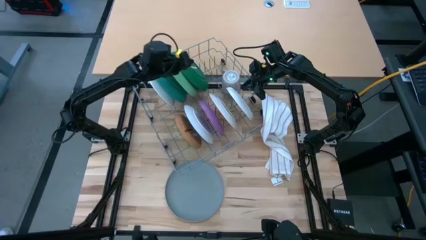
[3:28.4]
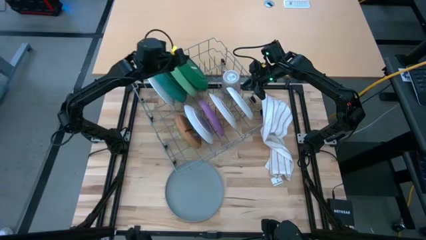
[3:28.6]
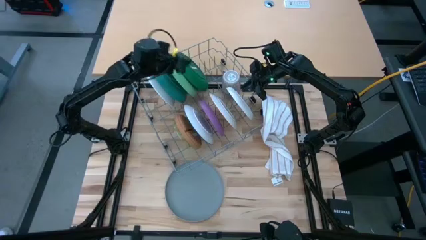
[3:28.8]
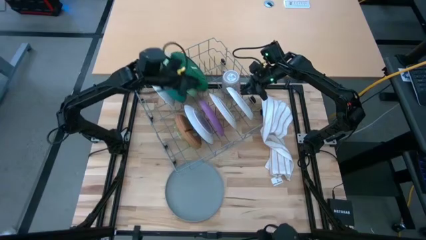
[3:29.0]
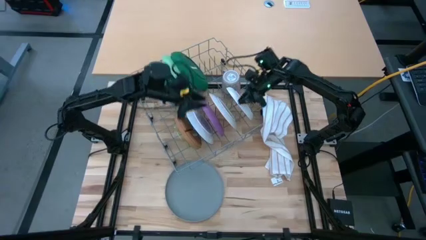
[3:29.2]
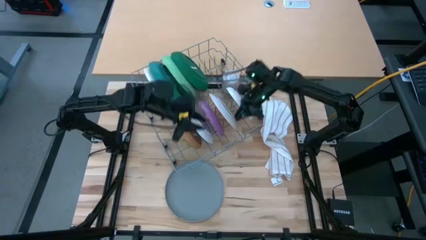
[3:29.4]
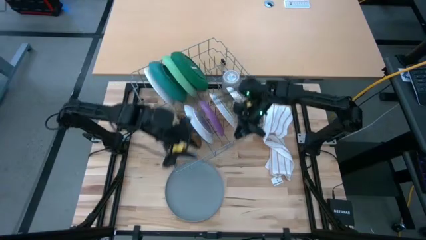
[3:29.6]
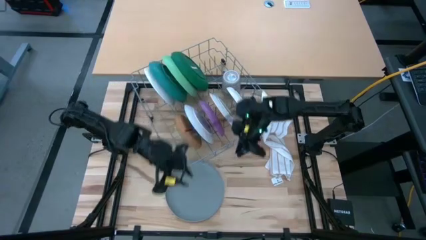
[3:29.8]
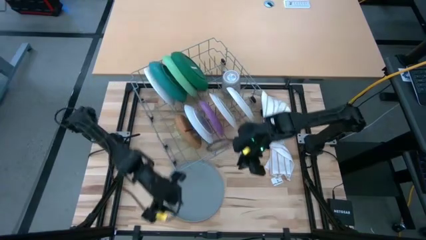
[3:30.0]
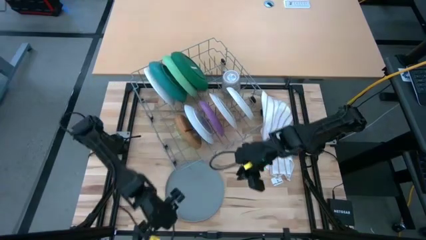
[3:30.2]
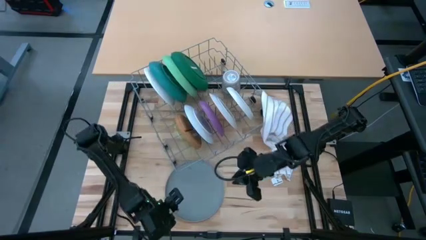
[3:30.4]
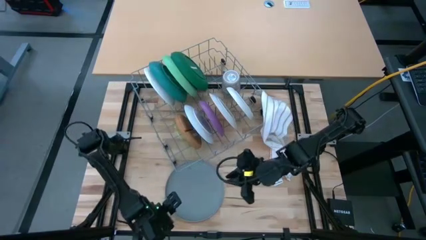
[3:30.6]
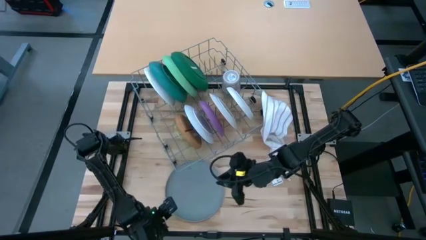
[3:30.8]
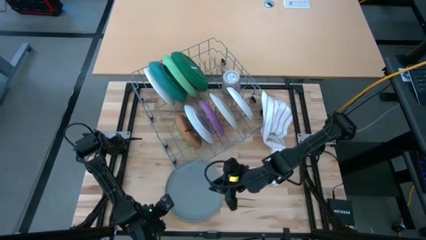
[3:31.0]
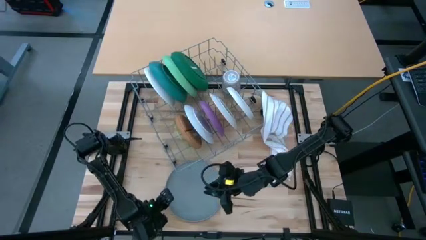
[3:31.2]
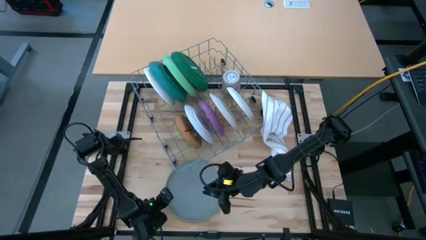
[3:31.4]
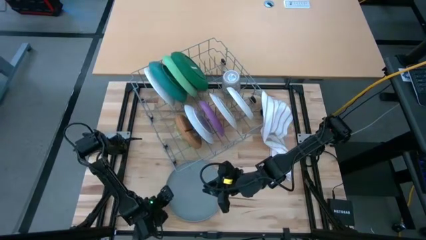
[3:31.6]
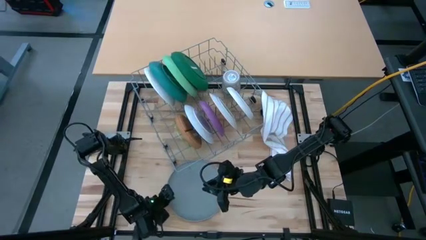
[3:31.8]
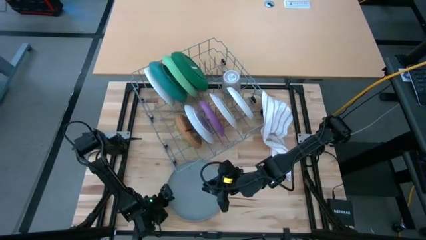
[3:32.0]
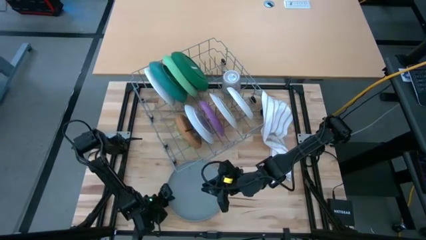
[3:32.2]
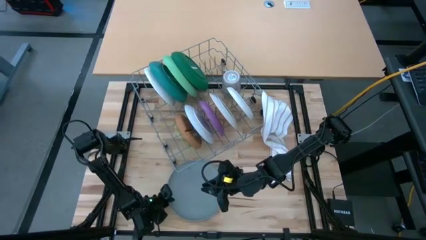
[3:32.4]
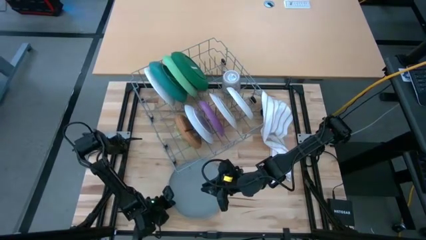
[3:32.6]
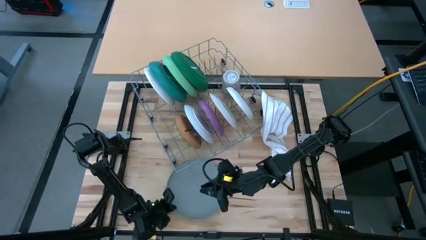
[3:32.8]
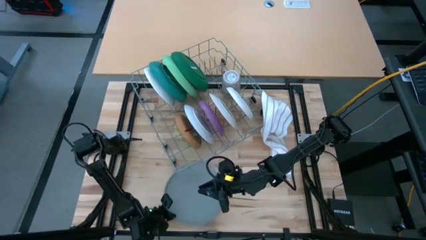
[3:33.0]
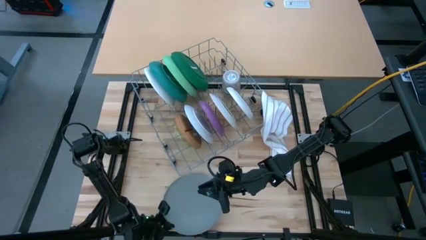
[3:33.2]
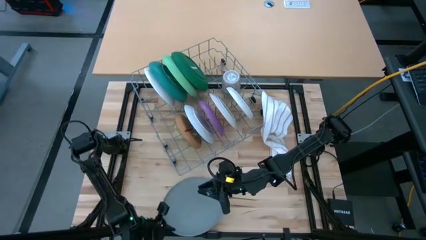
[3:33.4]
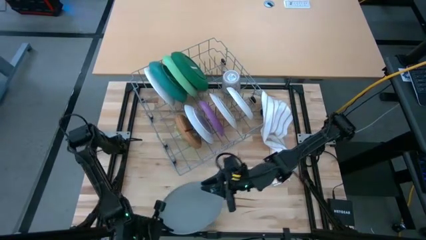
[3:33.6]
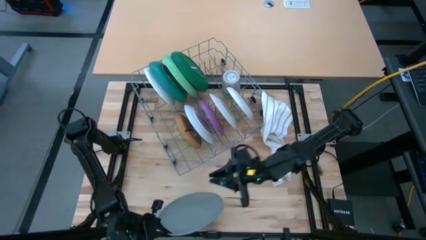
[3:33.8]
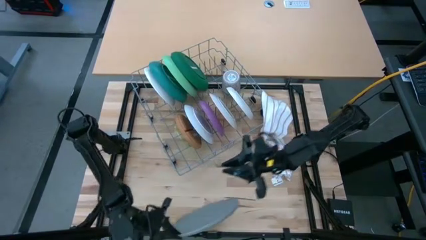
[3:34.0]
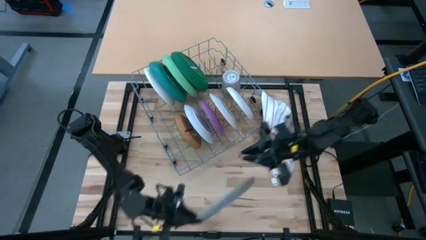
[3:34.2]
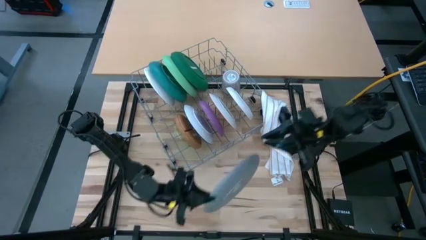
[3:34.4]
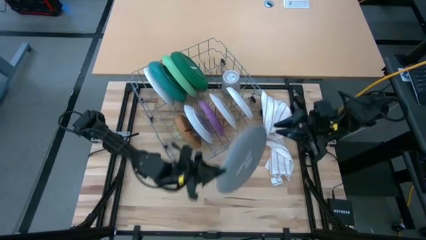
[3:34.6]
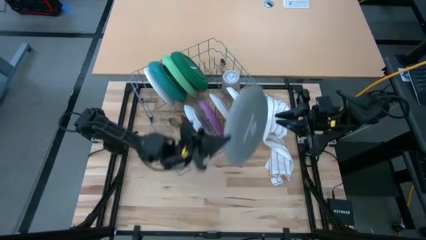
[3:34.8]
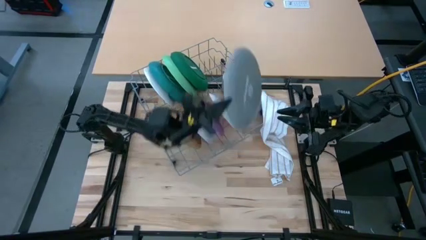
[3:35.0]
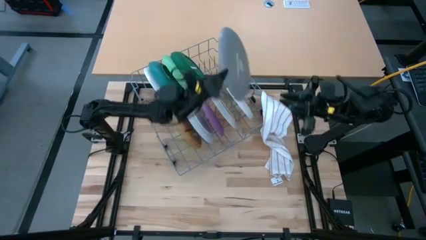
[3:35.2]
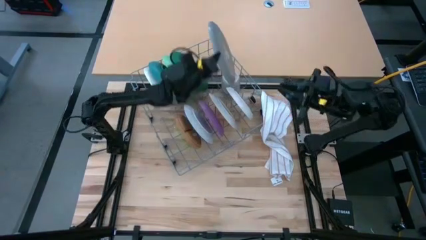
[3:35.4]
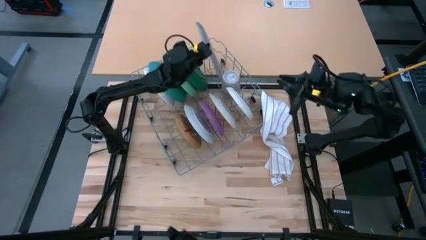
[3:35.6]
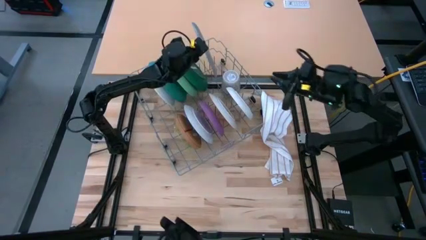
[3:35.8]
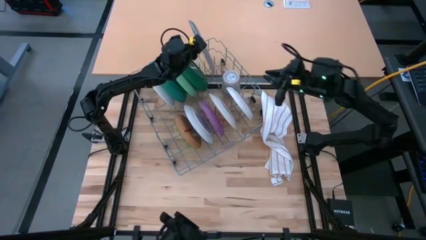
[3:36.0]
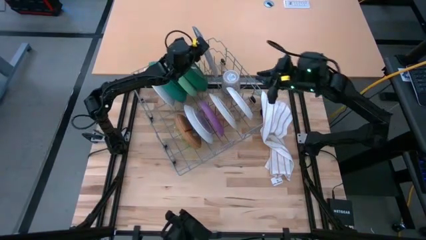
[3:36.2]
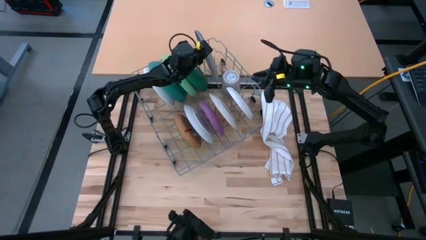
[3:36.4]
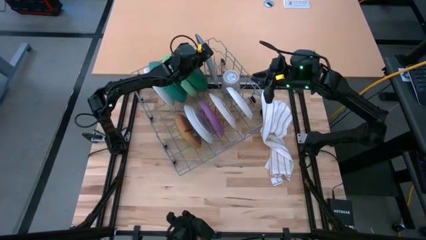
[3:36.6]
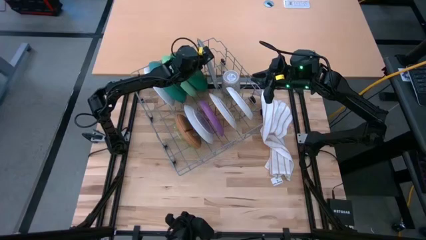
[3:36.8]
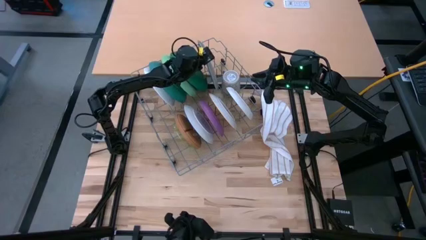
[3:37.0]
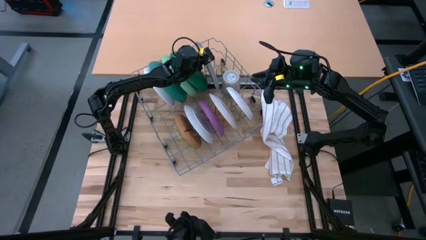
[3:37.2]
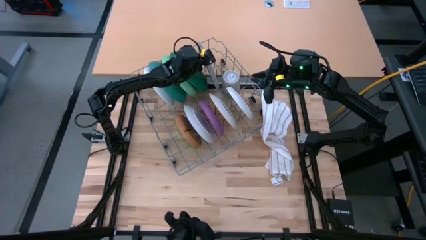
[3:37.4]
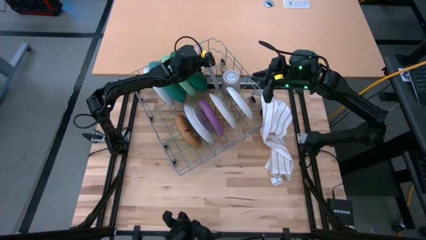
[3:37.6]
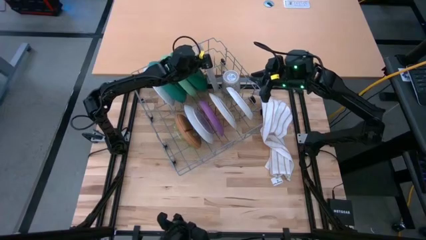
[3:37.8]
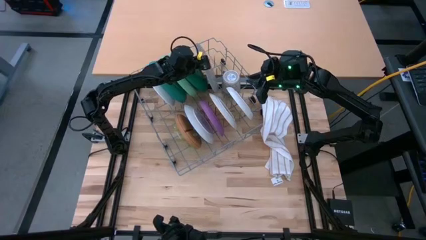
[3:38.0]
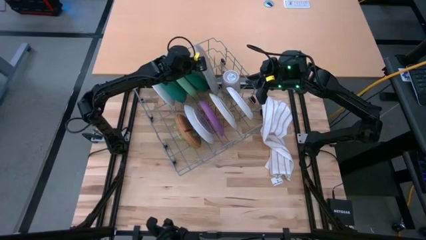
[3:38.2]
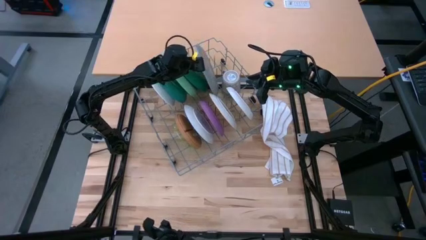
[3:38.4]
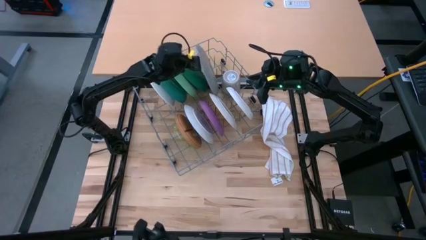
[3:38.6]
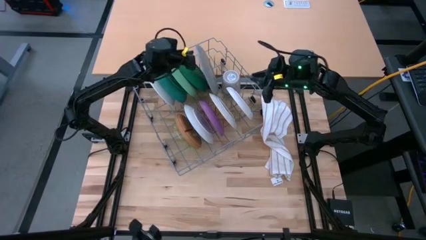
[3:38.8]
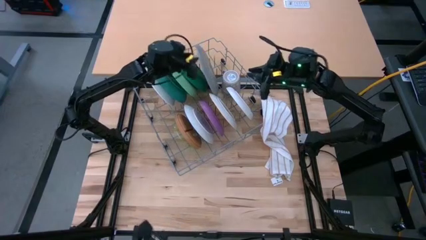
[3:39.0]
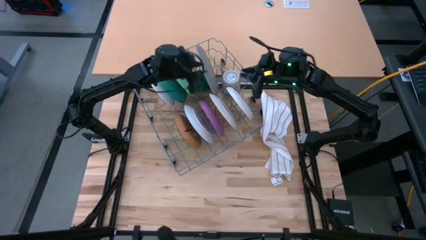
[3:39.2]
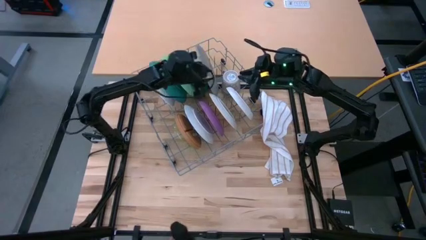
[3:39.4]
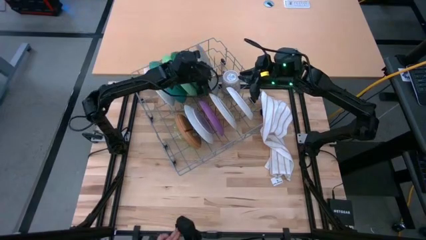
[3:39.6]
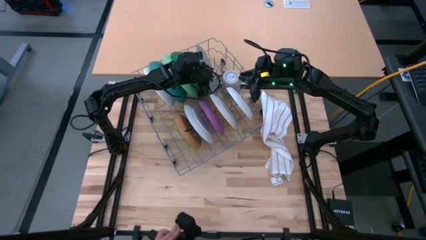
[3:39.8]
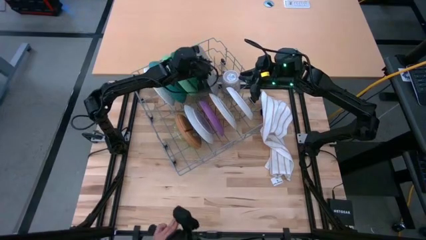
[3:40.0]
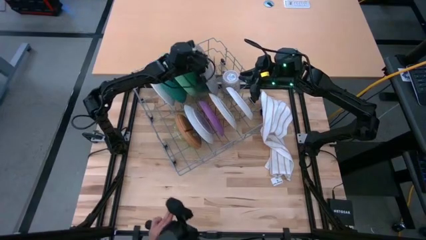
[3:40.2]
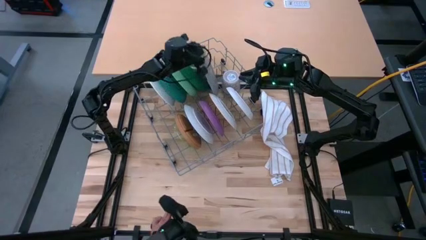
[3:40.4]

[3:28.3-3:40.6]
Task: Sort dishes
Put the grey plate into the dish rack

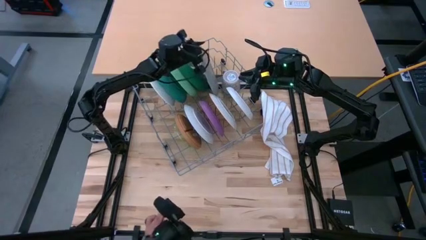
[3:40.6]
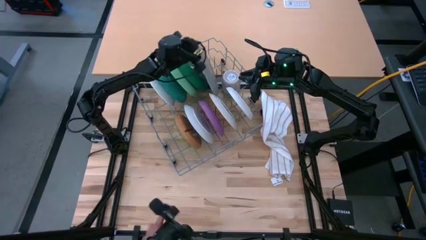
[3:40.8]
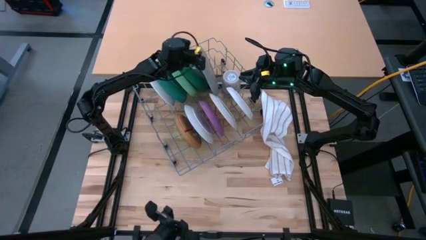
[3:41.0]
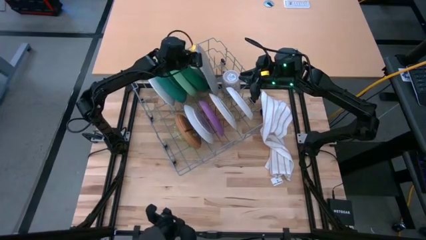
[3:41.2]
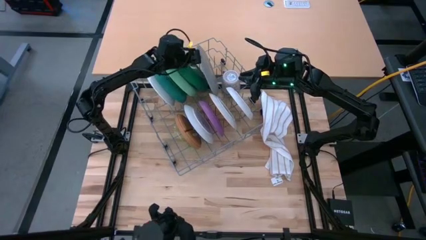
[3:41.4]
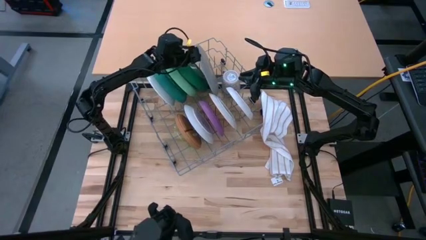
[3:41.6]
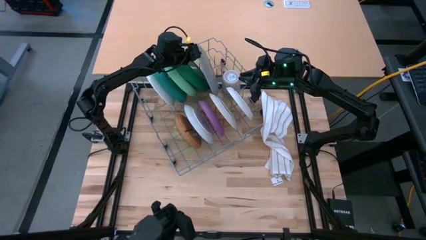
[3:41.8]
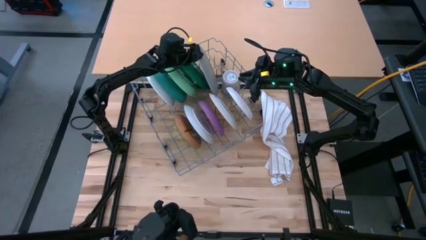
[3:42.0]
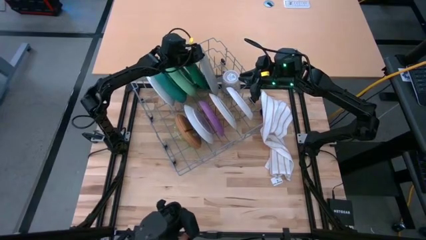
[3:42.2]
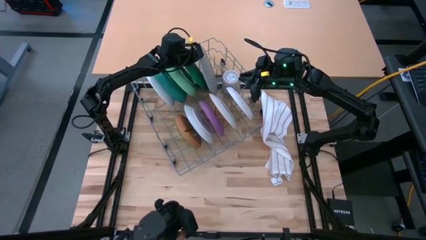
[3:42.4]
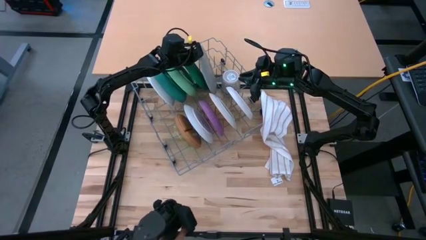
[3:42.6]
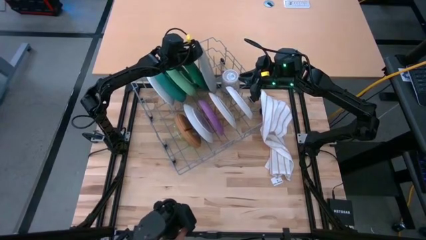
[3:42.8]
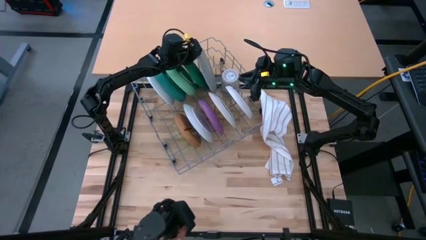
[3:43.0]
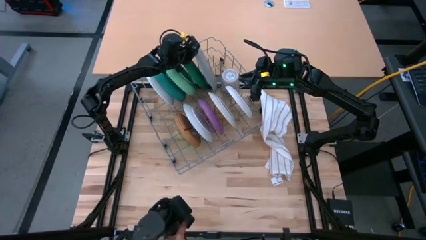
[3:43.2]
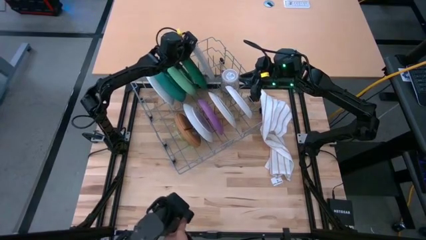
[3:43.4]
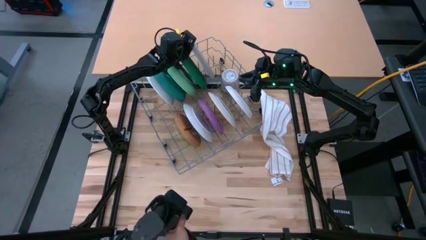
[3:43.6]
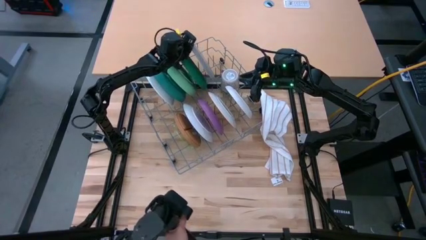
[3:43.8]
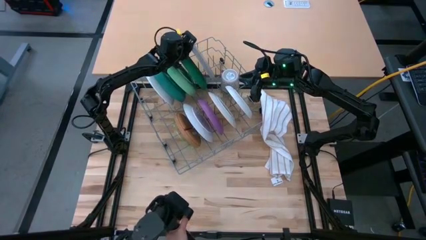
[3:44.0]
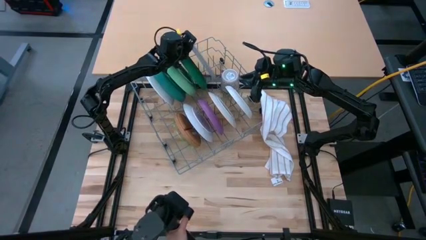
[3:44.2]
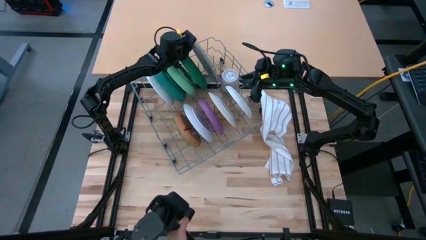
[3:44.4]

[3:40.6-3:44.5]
Put the grey plate into the dish rack
